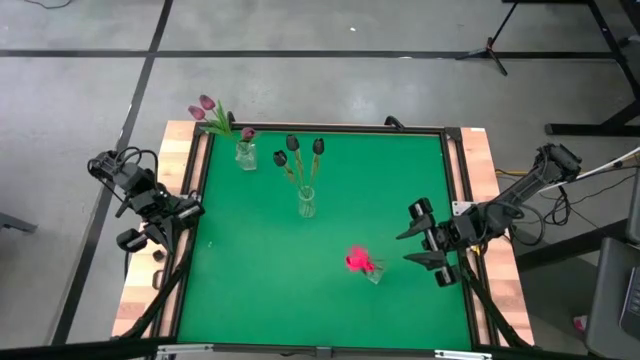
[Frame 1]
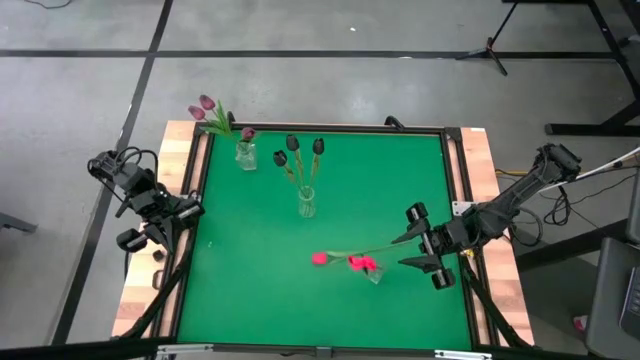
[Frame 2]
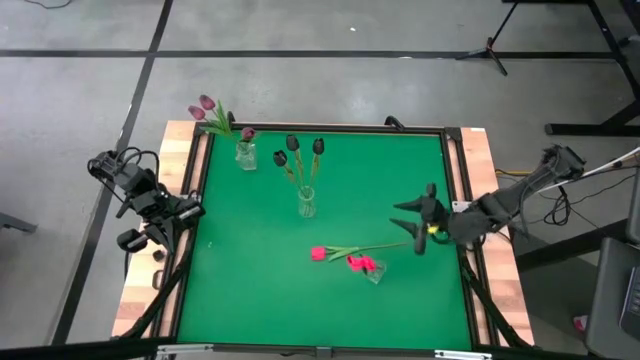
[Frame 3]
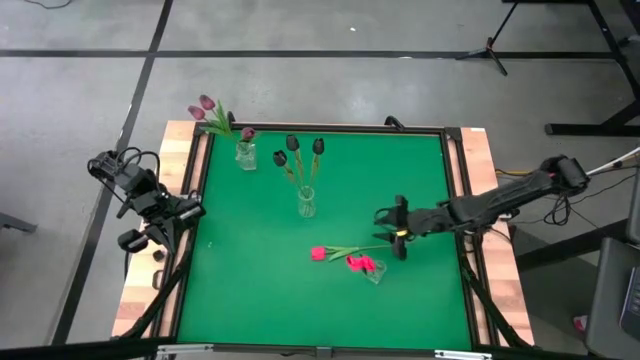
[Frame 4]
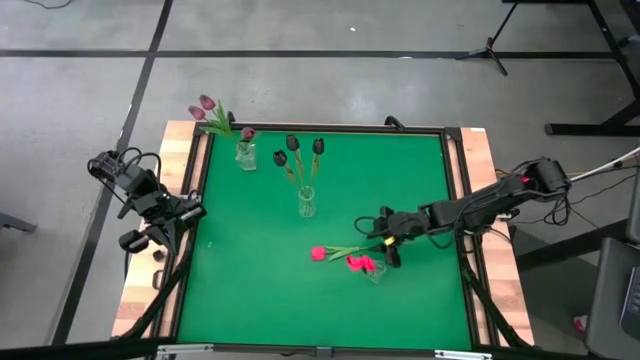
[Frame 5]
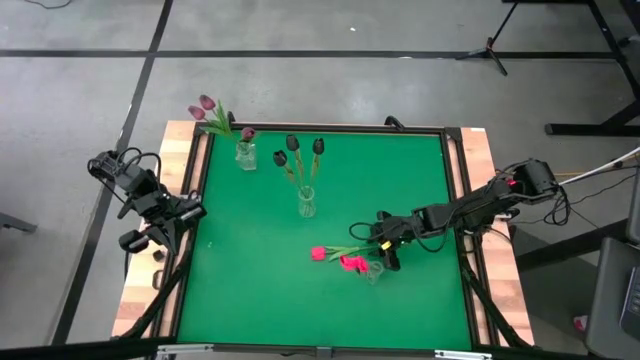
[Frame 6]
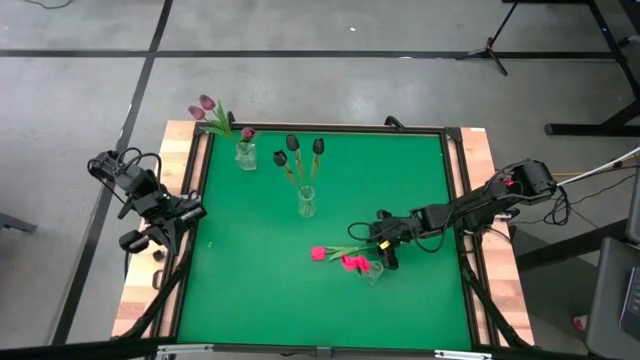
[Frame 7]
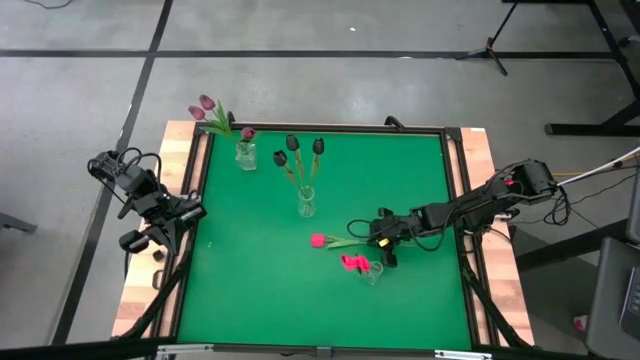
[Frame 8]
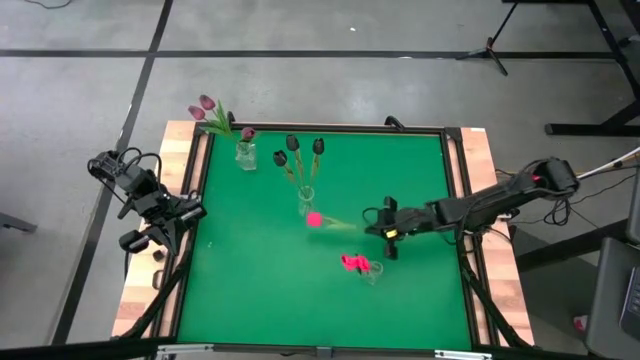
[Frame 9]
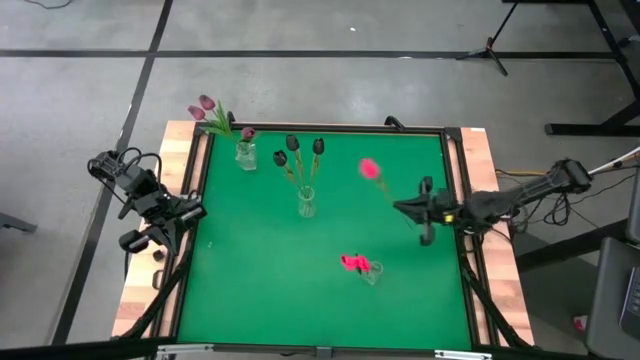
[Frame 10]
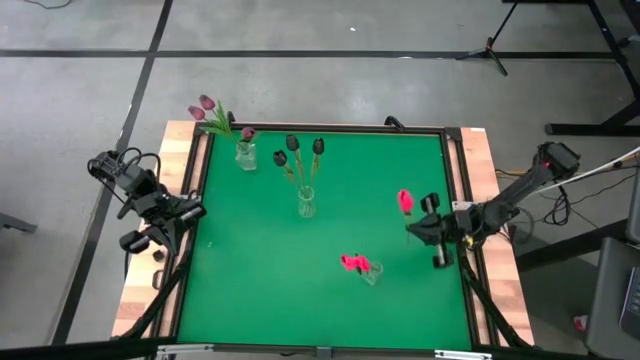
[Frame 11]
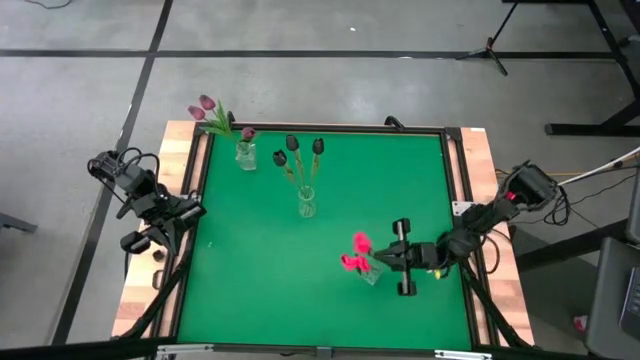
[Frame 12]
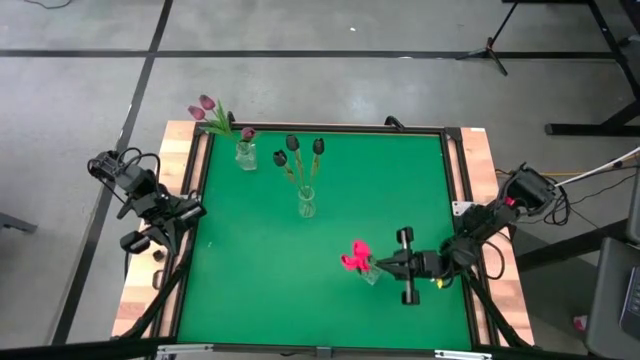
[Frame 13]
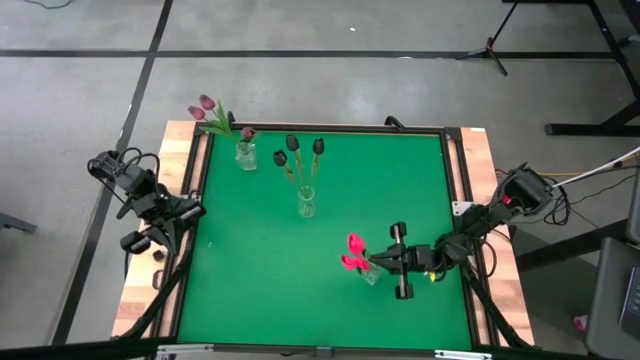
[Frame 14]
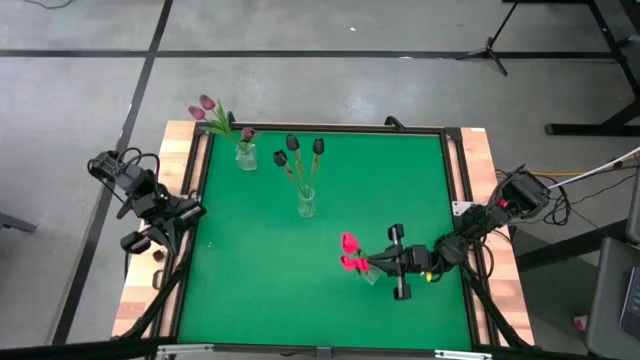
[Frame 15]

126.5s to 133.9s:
Task: Sort flowers into vase by color
Put the pink tulip into the bottom transparent vase

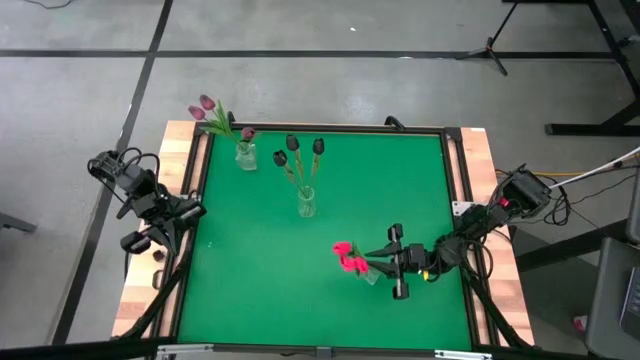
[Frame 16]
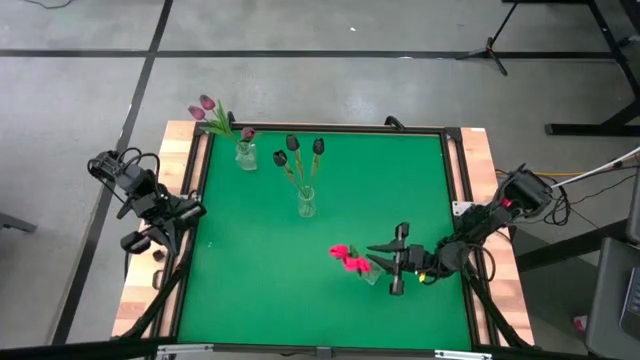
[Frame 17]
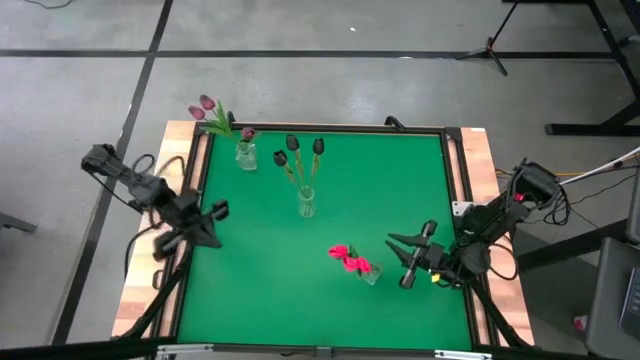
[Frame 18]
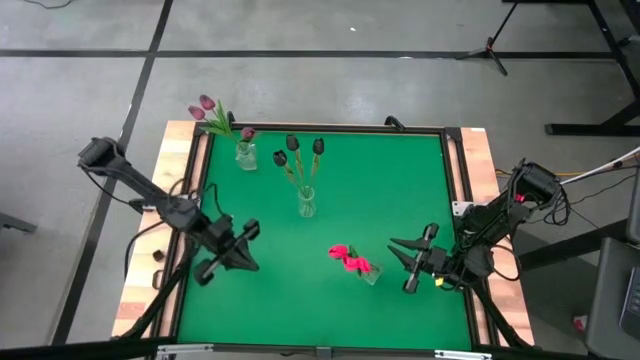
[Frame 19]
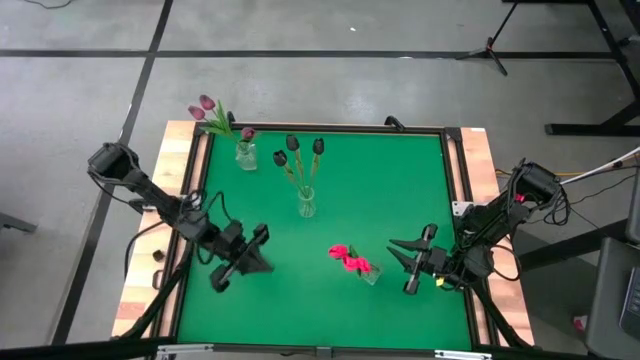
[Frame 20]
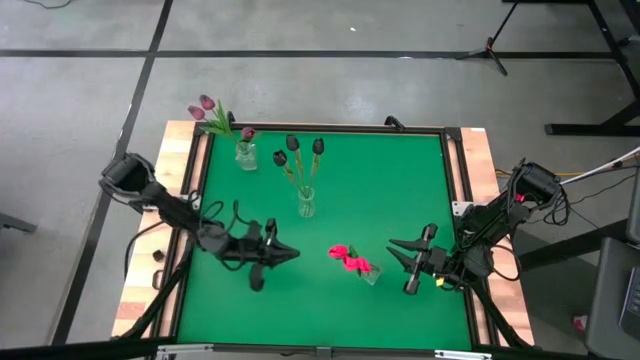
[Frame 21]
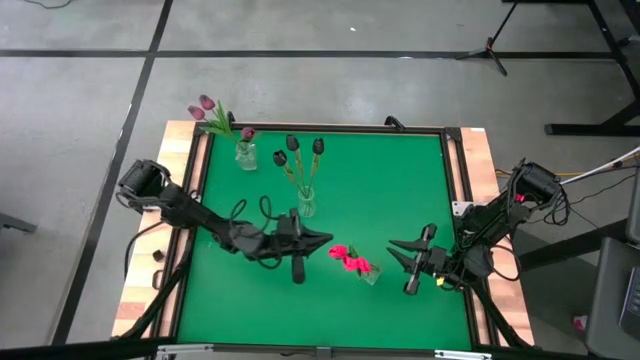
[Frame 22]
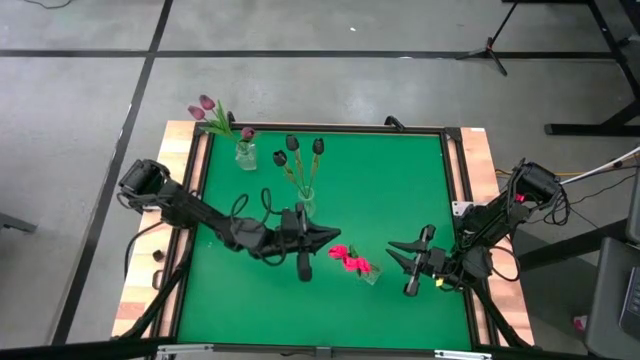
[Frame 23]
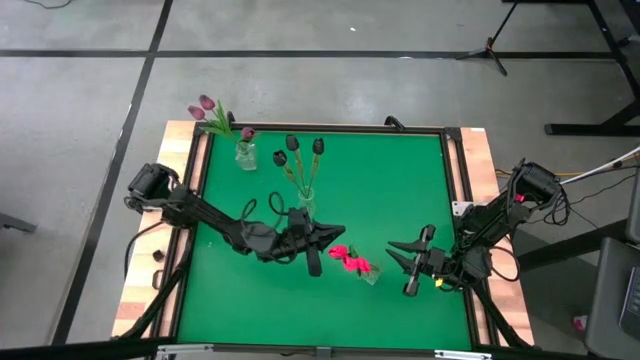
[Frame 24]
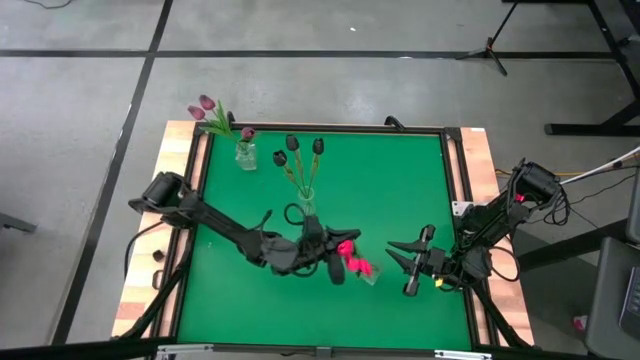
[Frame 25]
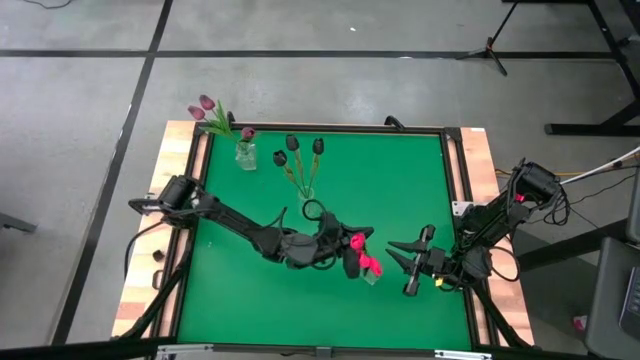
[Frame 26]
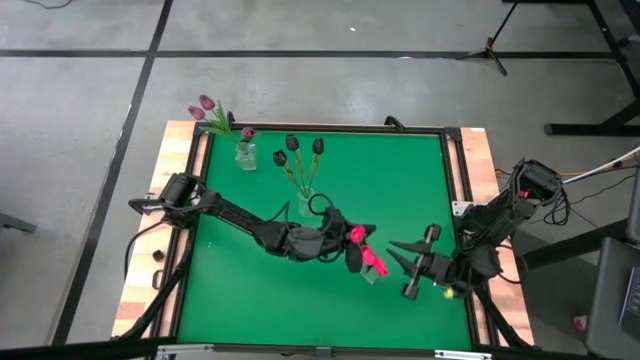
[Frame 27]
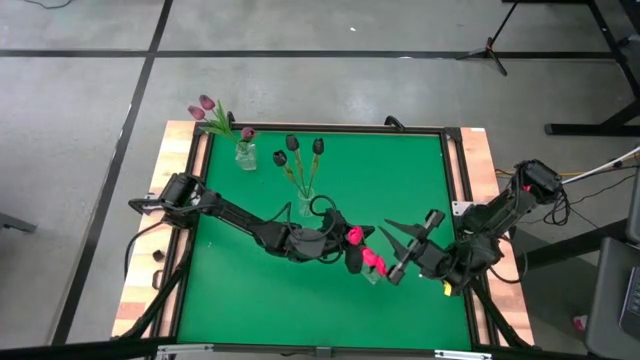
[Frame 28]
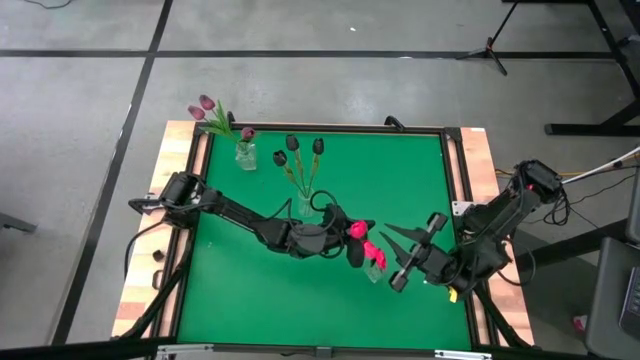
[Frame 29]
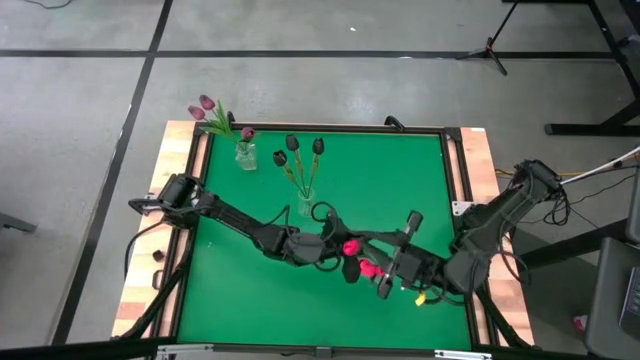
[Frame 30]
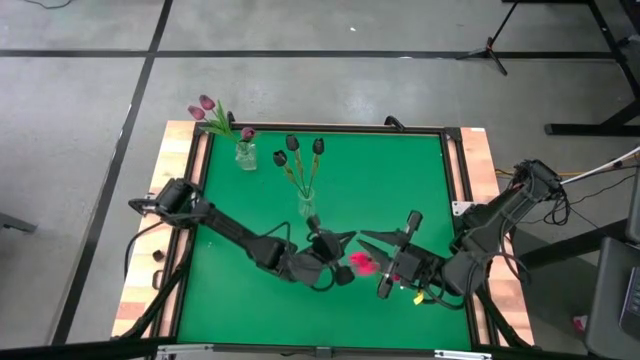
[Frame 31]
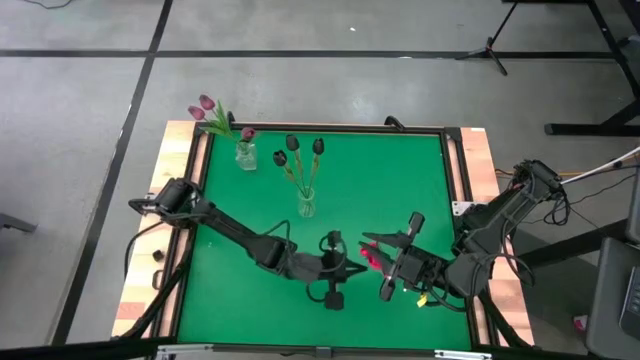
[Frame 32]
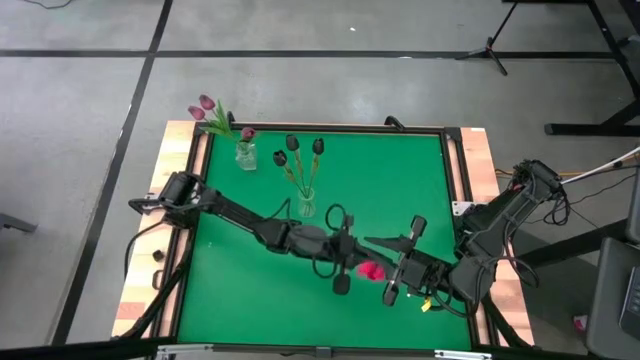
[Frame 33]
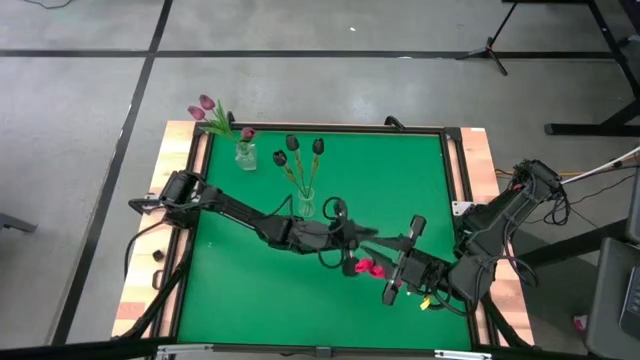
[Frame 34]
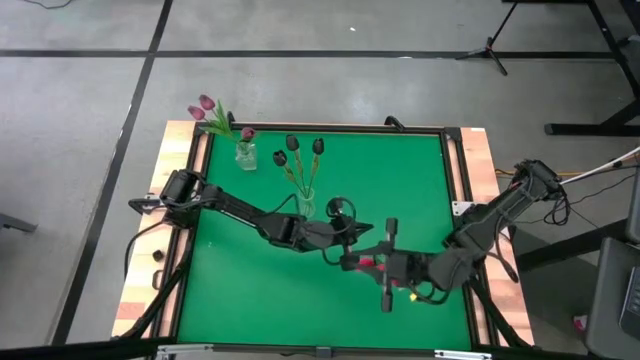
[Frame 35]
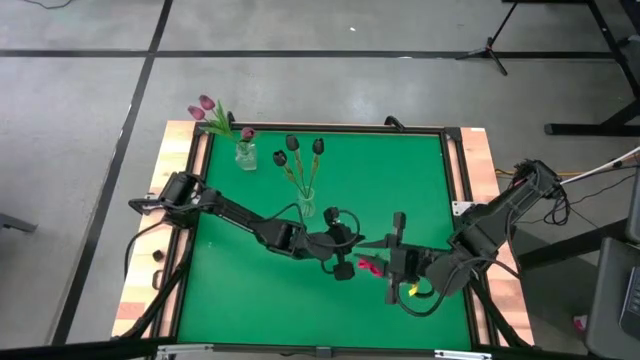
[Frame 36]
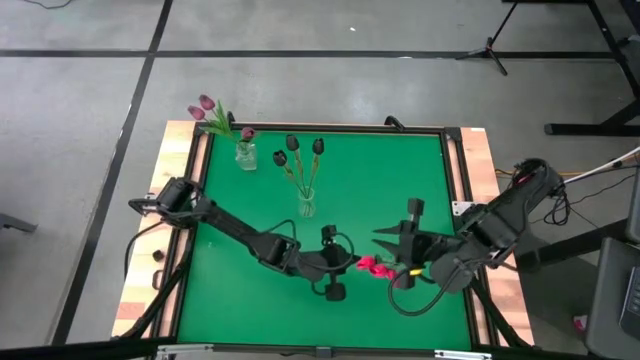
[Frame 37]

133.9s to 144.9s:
Adjust the pink tulips

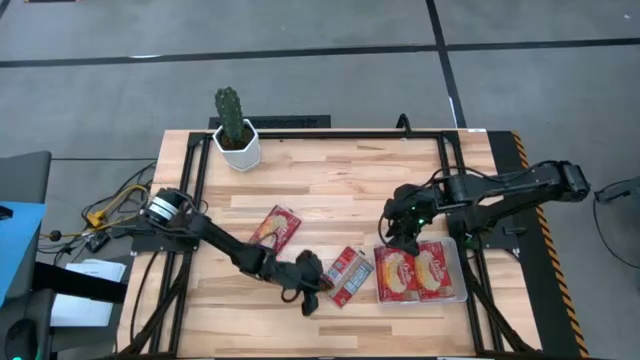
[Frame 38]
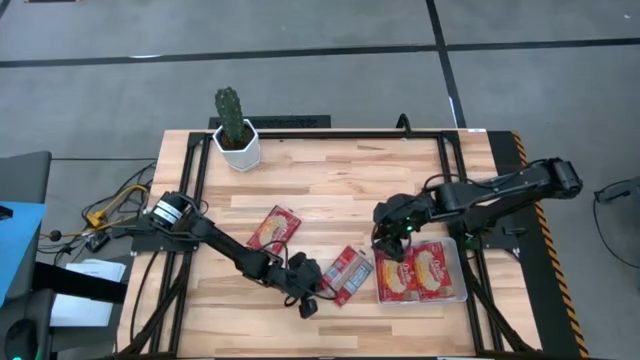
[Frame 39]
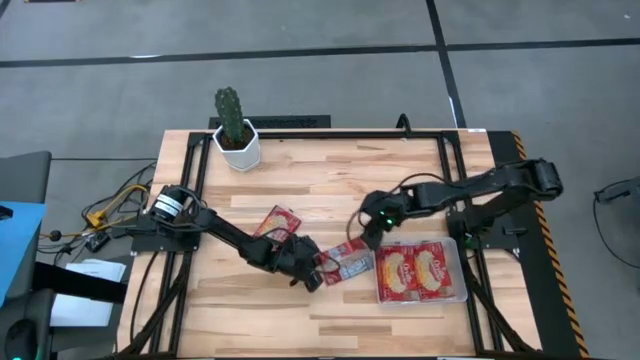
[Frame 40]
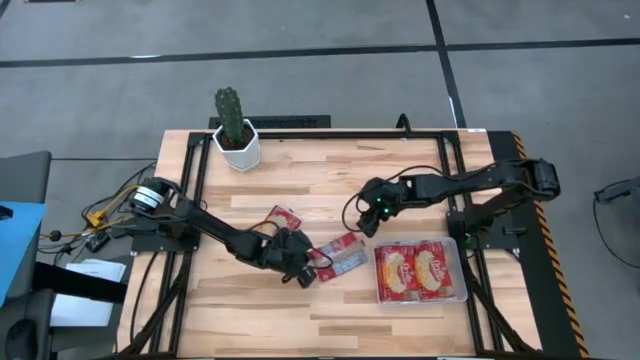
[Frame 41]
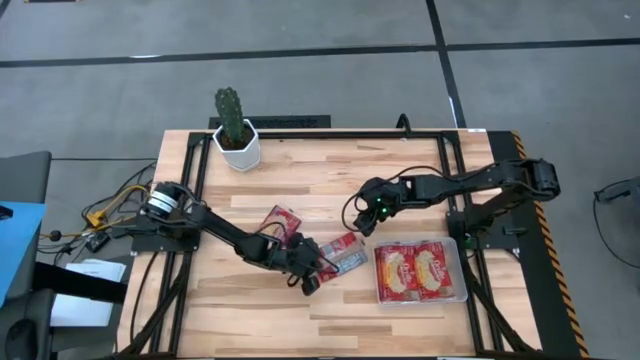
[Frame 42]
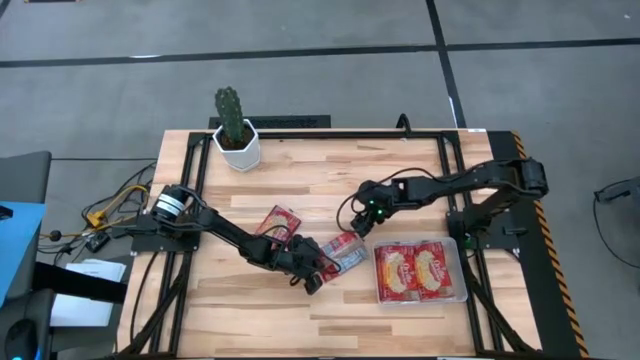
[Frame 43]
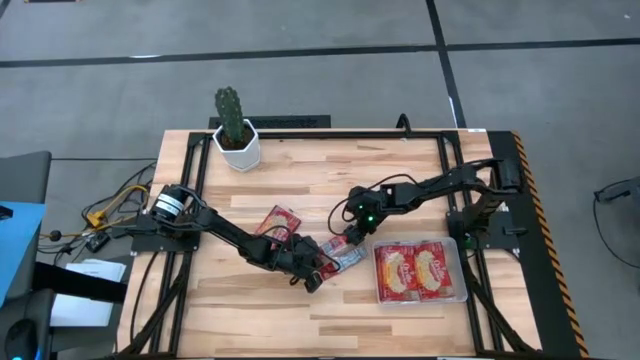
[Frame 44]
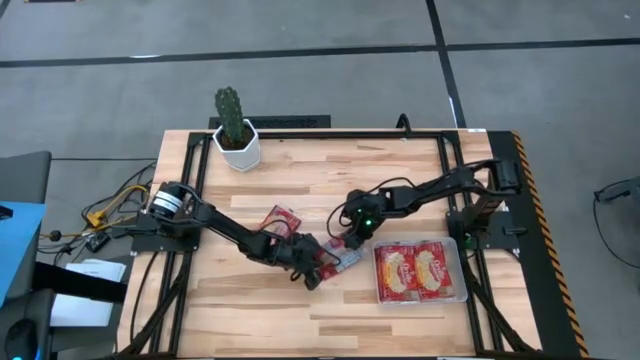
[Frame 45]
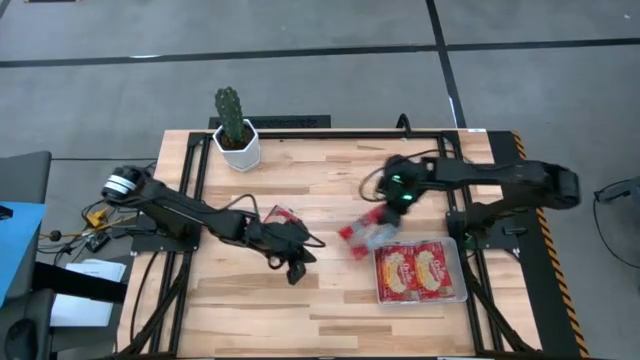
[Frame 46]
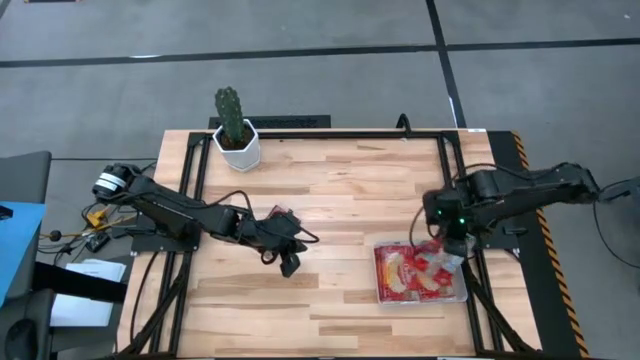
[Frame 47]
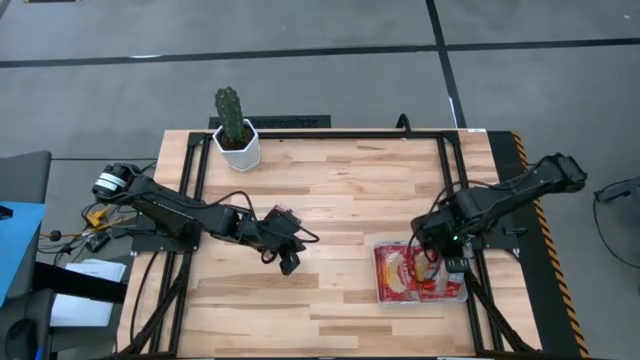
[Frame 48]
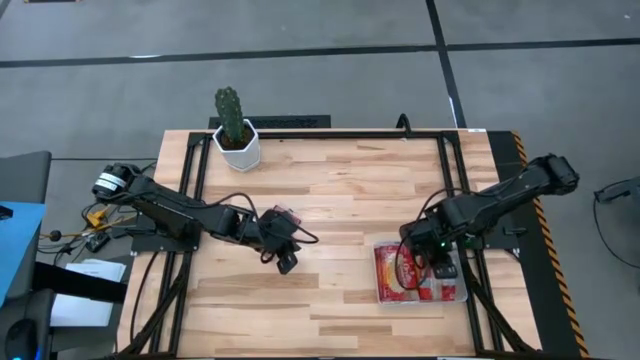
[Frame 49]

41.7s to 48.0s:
Task: Sort popcorn bags into baskets
Put the popcorn bag into the transparent bin
